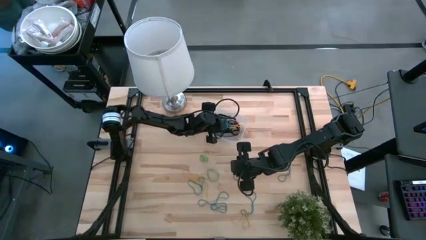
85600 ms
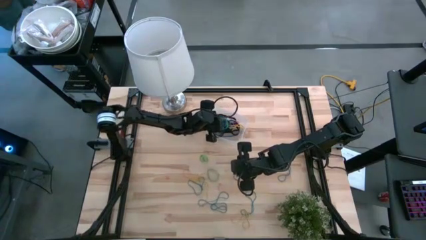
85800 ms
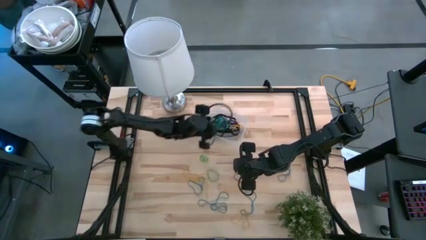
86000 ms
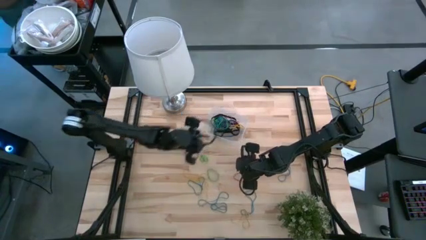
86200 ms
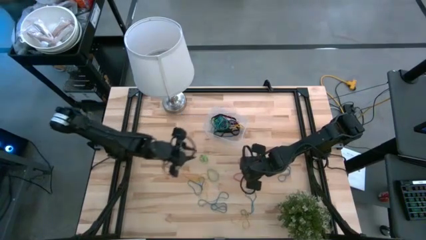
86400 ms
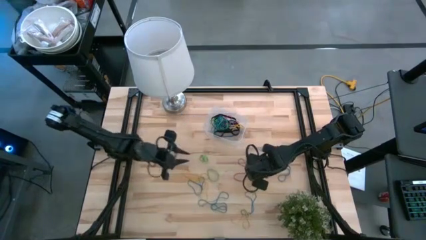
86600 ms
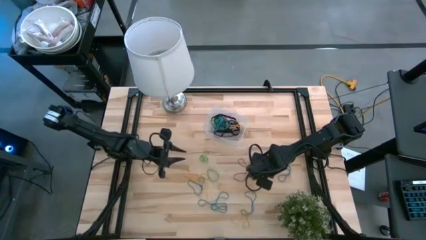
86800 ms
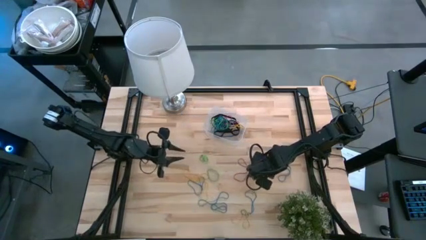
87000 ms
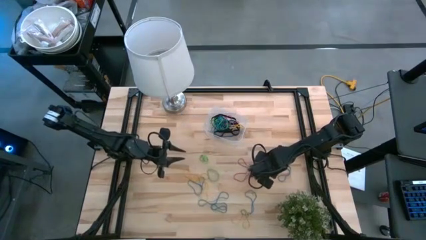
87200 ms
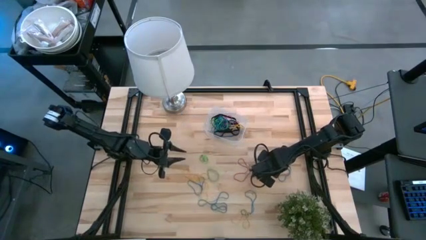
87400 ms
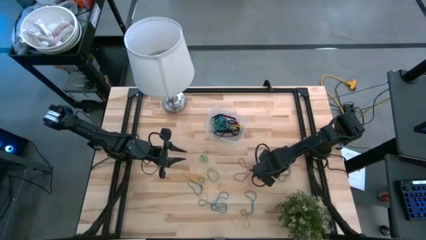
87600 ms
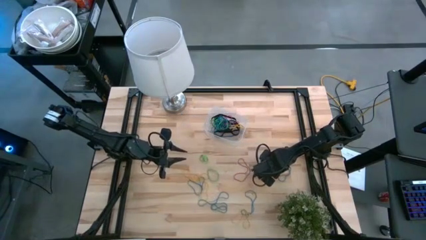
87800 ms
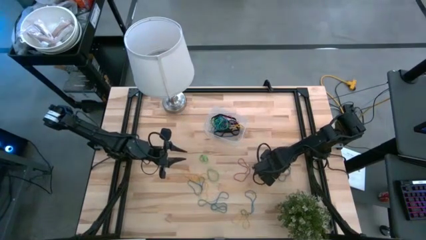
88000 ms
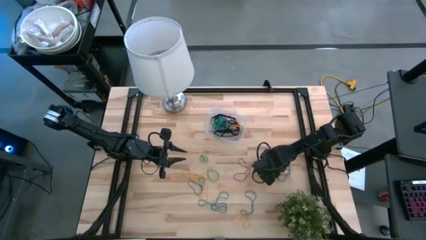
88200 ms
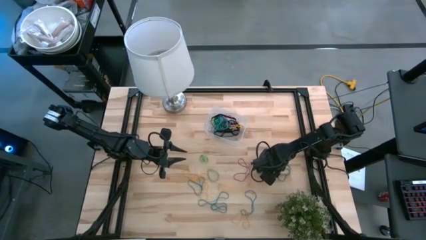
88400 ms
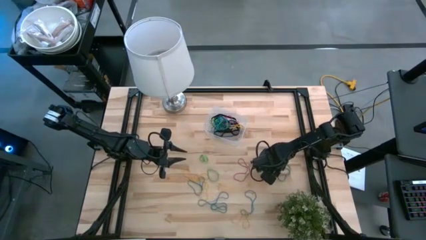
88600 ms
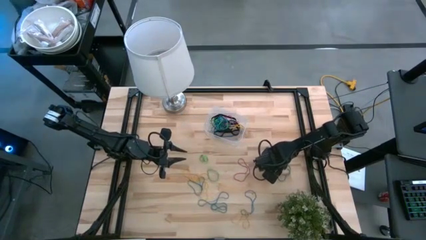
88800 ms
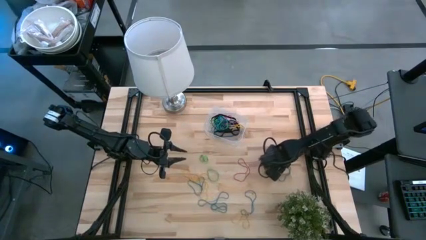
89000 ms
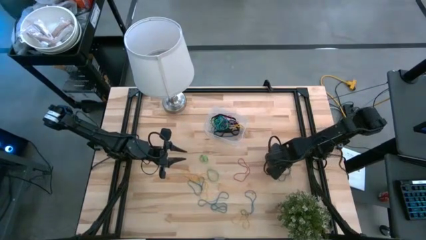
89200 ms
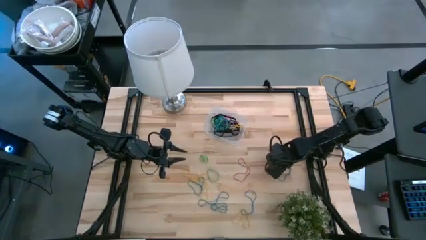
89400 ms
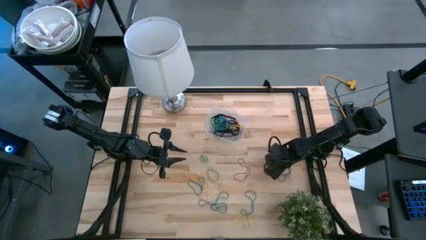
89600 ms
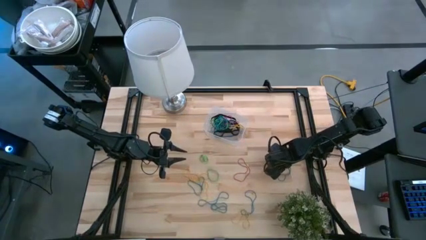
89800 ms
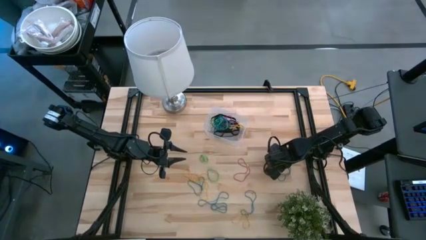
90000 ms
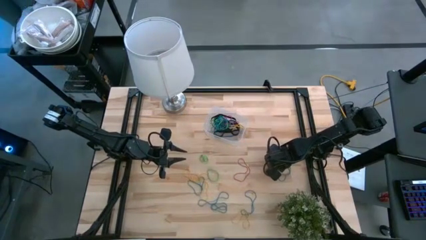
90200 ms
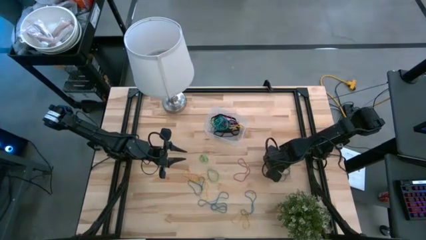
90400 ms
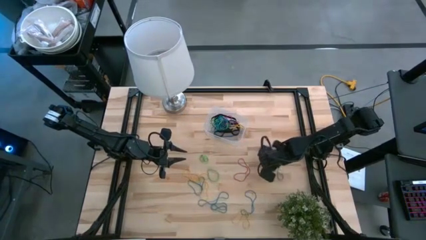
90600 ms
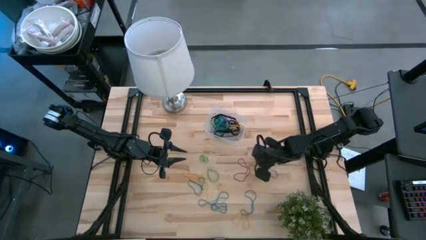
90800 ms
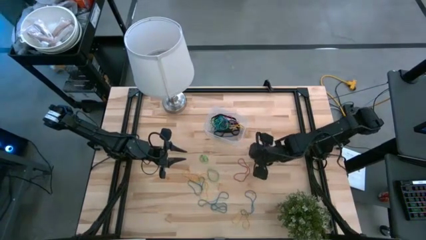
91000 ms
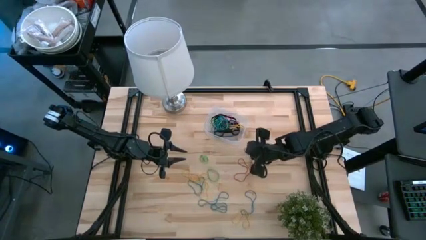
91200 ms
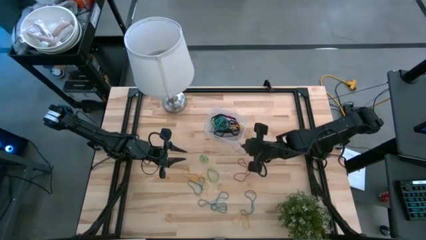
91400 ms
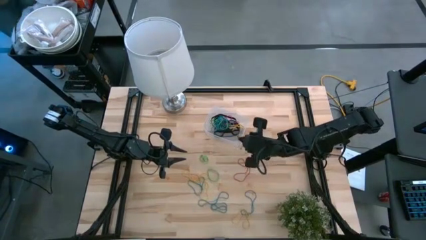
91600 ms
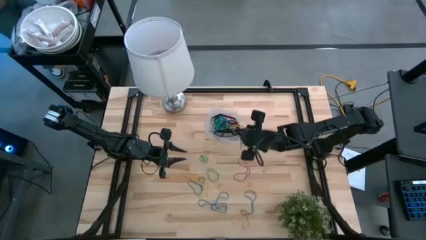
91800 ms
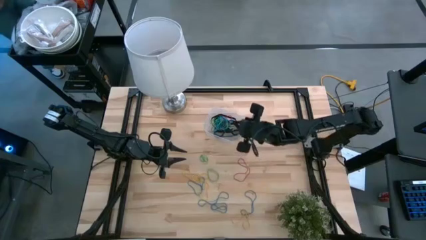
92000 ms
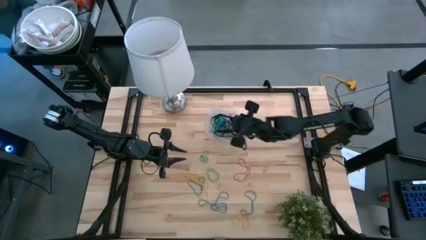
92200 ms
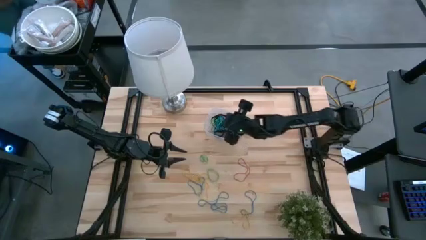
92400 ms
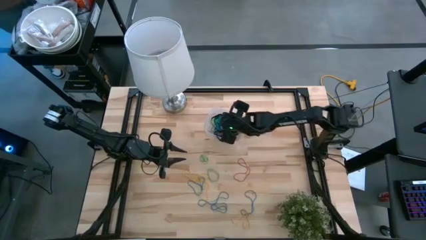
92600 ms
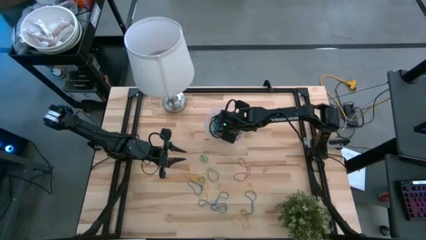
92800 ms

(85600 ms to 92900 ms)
Task: Pick and place rubber bands into bin
Put the blue rubber bands into the bin

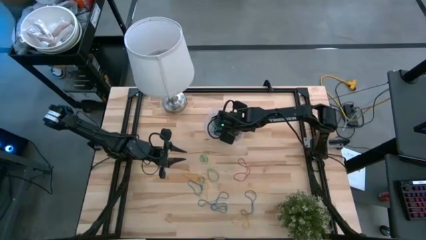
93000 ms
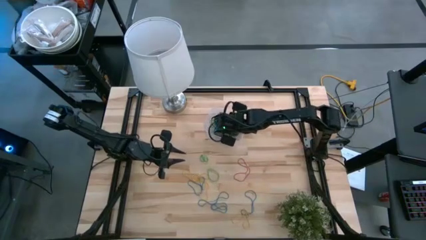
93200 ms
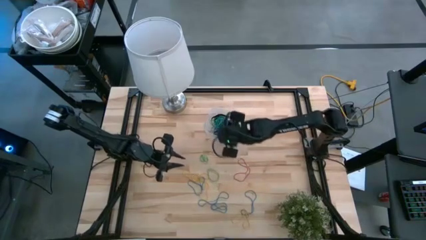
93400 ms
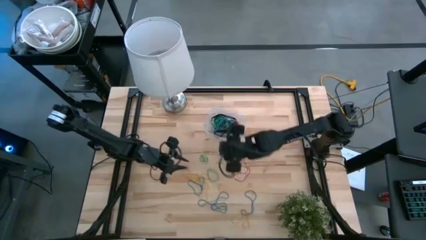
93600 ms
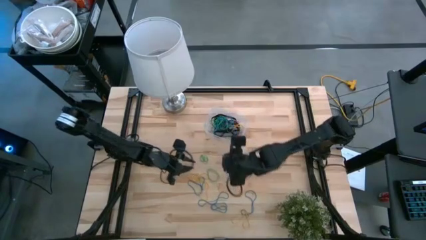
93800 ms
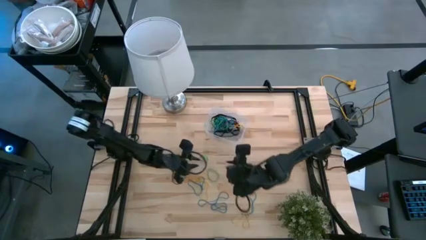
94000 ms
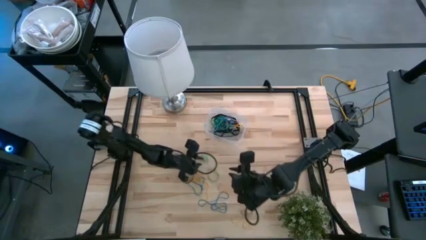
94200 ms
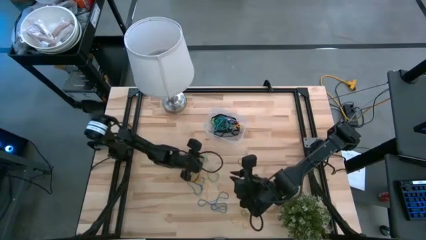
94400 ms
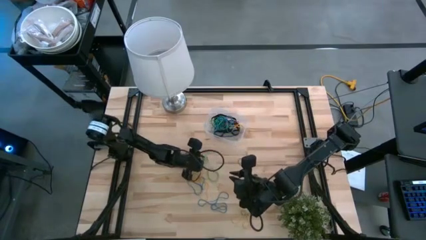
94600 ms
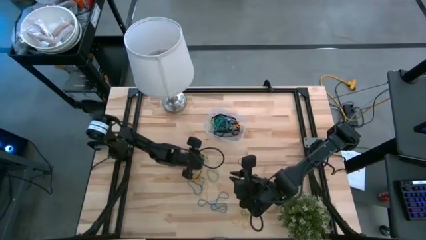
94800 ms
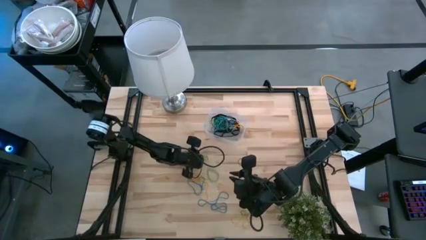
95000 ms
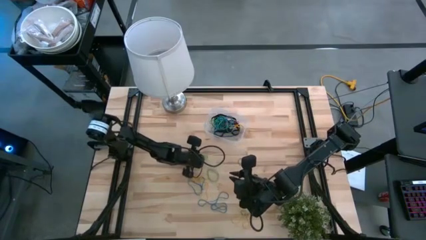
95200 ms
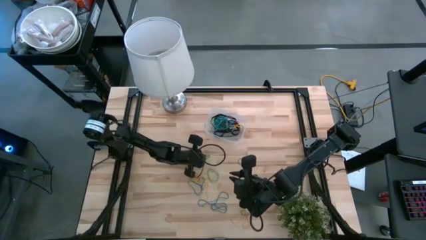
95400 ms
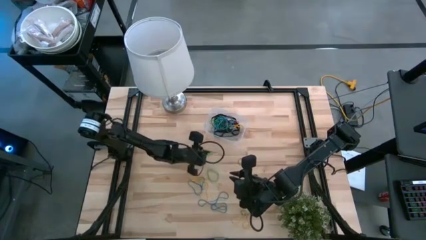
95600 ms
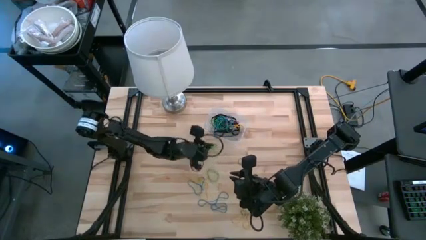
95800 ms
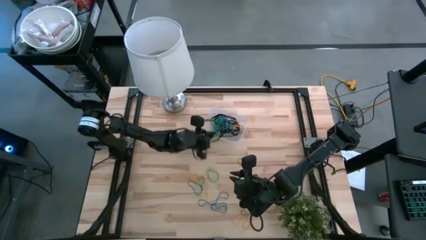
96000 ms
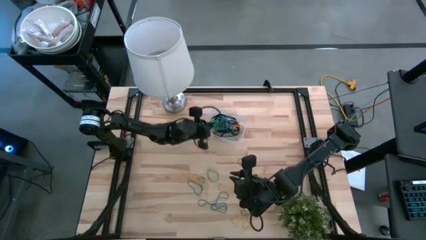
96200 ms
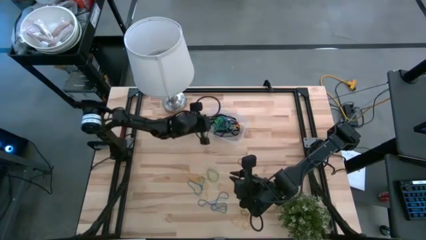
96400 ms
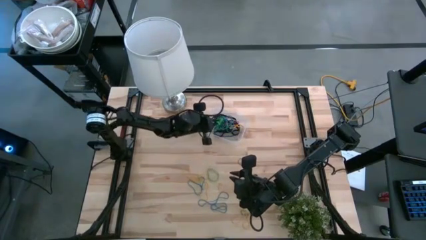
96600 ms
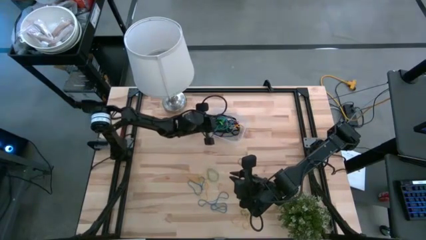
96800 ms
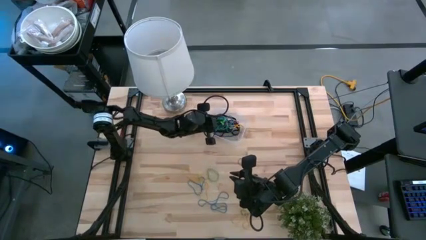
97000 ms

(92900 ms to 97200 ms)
Put the green rubber bands into the bin

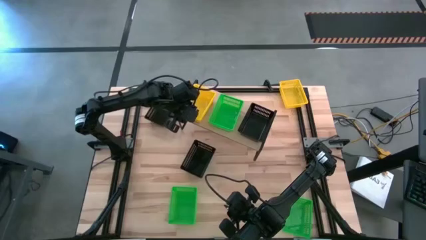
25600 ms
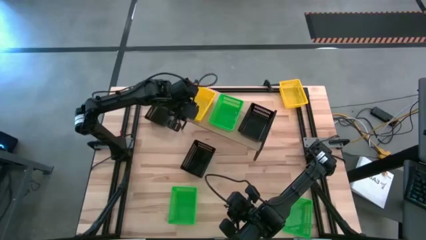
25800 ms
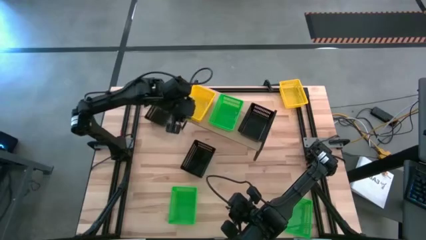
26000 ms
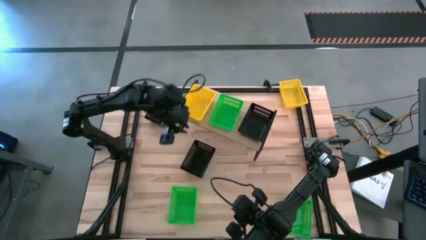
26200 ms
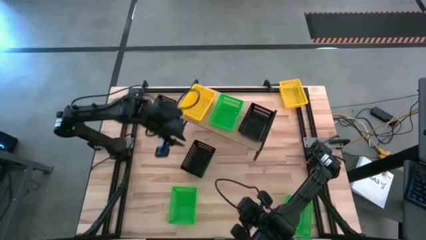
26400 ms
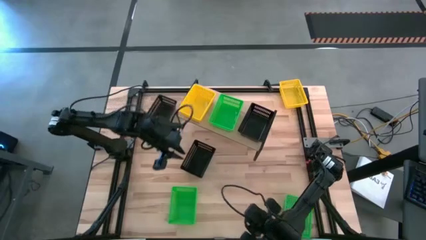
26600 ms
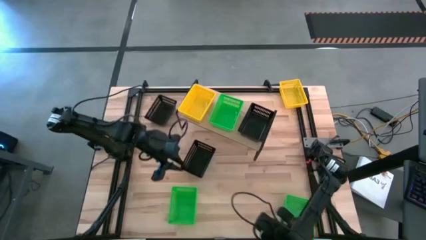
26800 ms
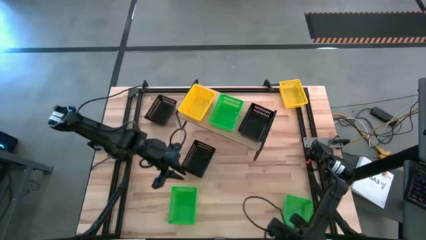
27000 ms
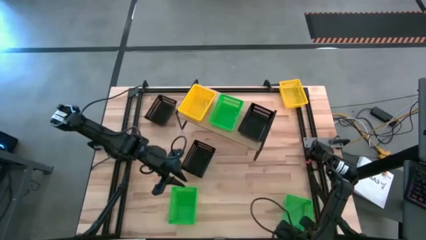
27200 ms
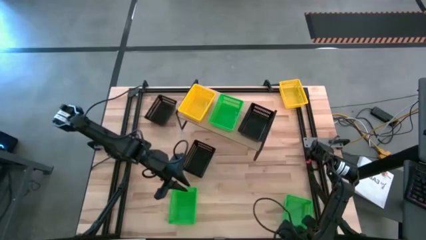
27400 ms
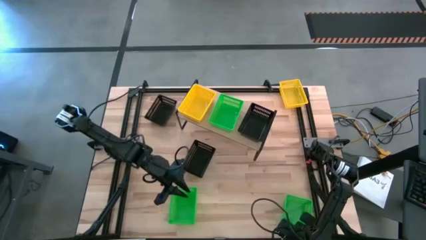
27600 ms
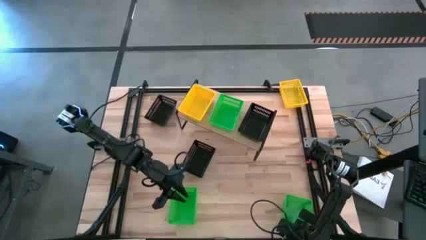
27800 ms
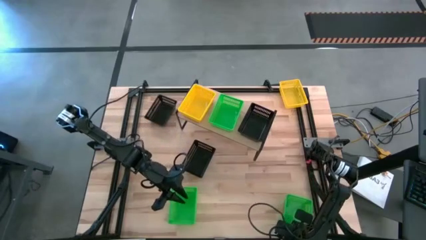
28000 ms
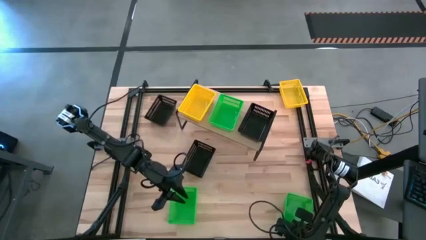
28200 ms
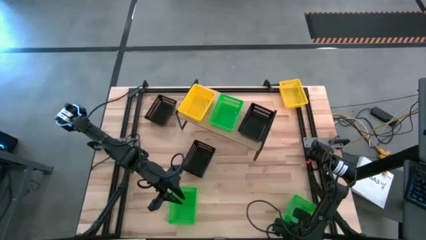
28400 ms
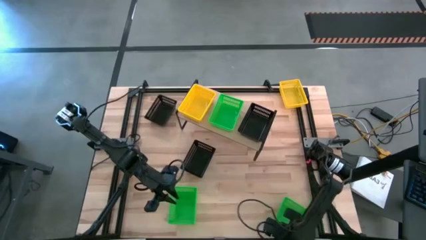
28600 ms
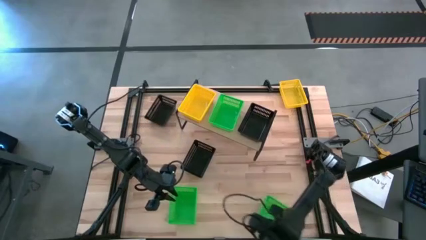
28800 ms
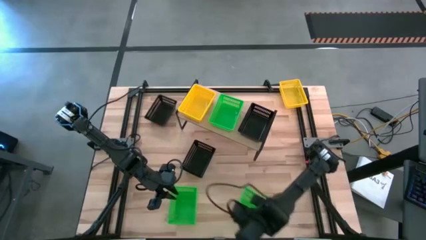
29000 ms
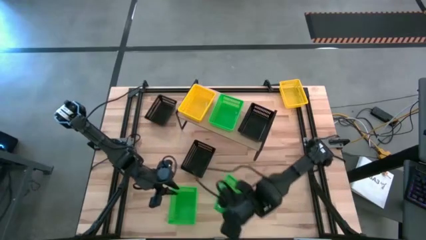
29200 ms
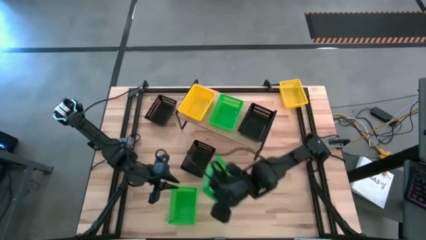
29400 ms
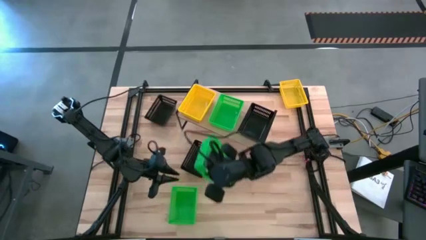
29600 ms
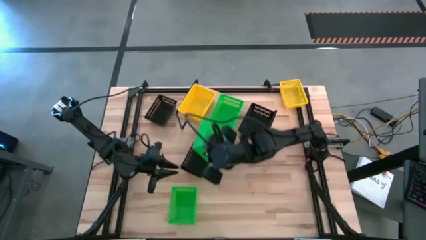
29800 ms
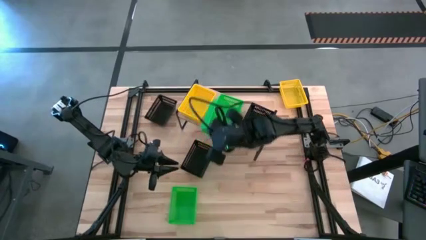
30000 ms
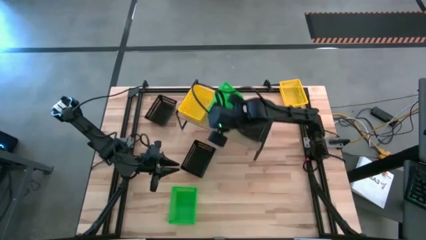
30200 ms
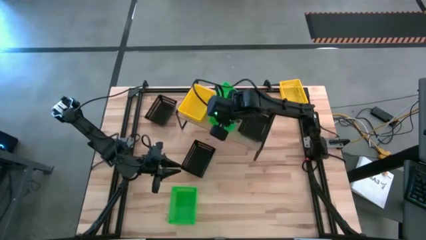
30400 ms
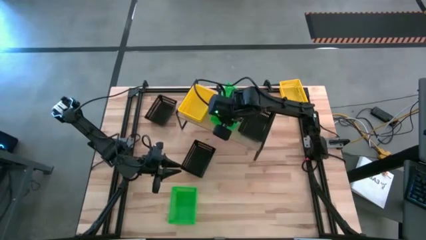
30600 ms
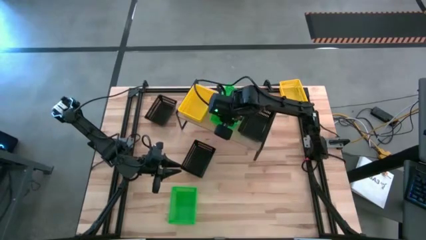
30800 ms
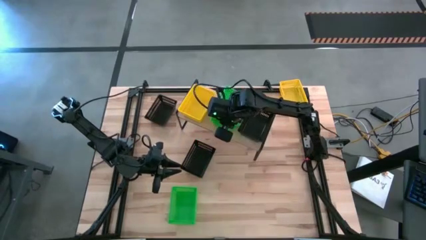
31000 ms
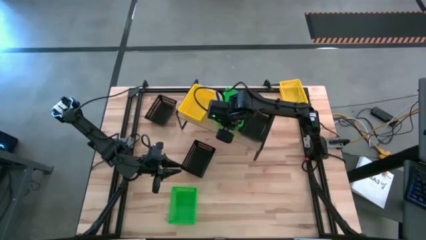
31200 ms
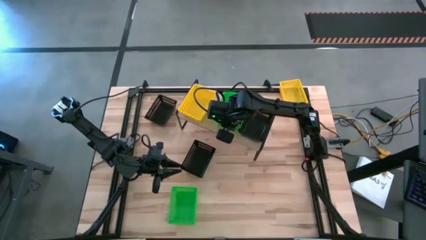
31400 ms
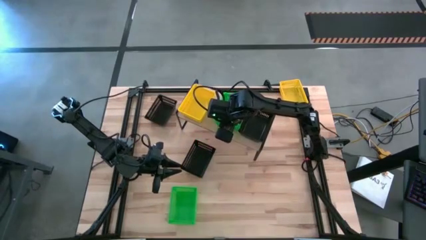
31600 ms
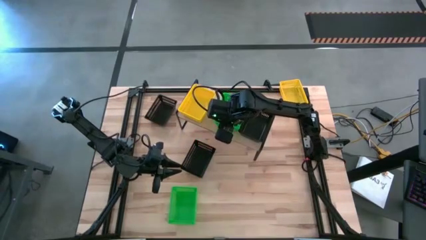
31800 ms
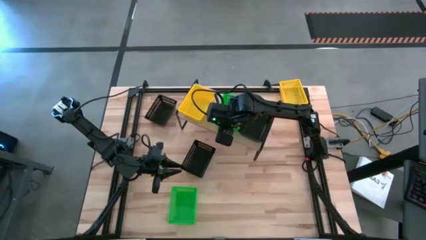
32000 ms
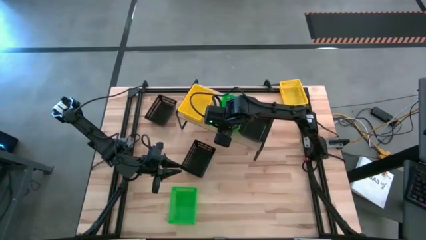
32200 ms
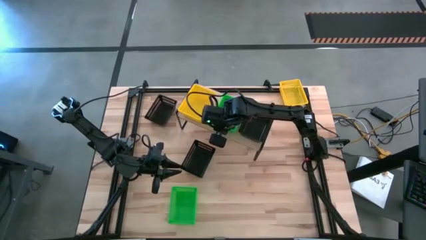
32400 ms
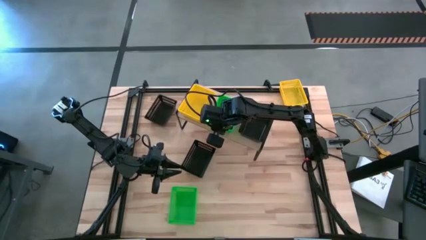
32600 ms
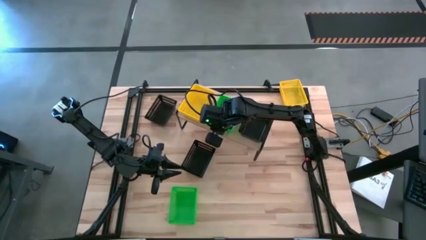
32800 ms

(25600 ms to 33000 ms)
Task: Stack baskets on shelf by color
Stack the right green bin on top of the green bin
